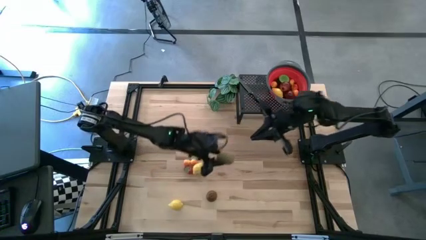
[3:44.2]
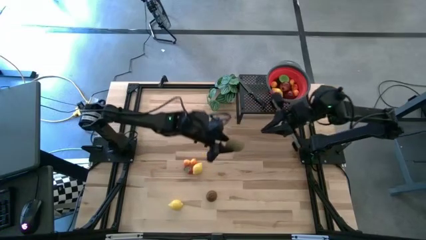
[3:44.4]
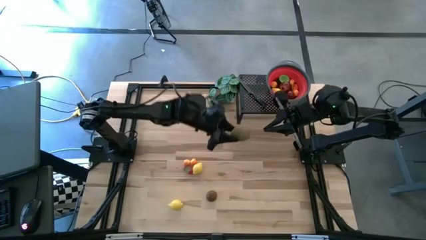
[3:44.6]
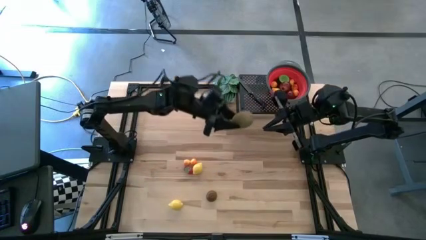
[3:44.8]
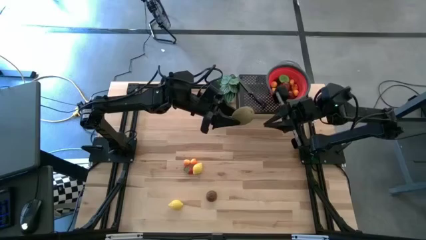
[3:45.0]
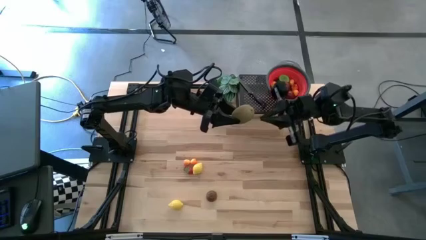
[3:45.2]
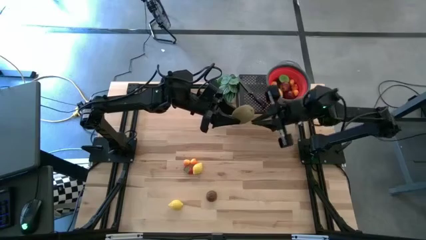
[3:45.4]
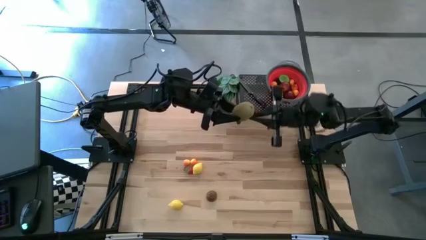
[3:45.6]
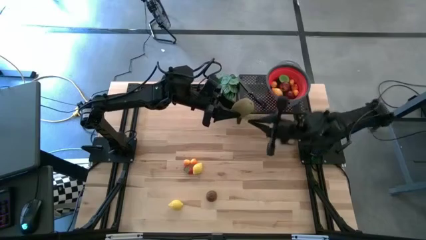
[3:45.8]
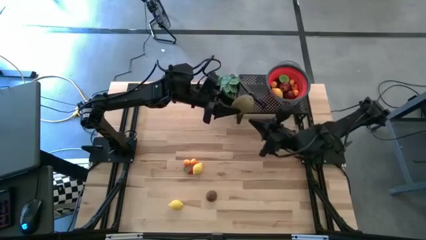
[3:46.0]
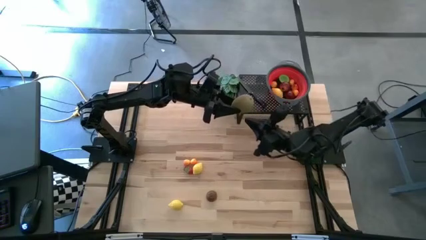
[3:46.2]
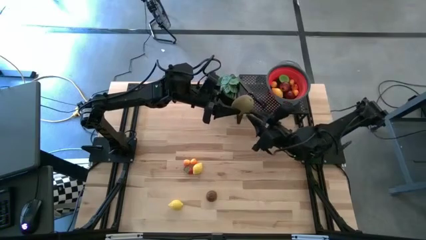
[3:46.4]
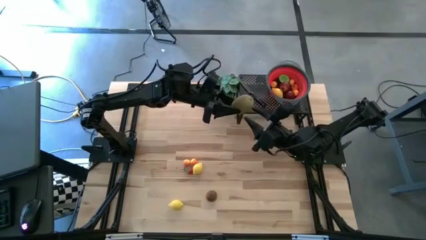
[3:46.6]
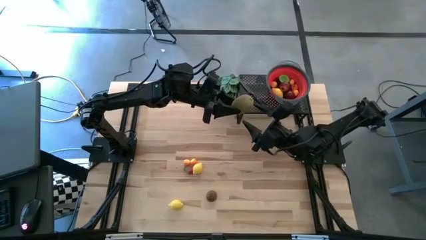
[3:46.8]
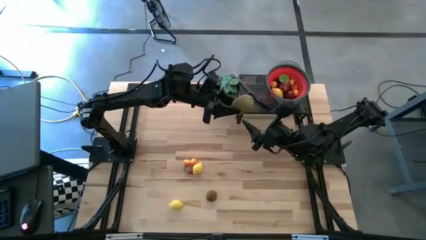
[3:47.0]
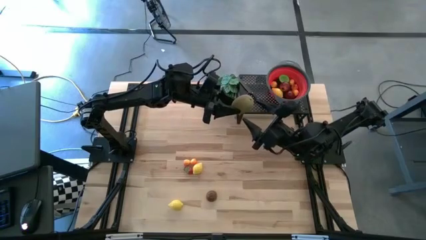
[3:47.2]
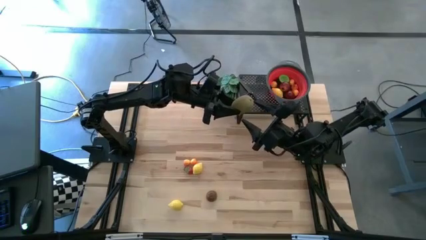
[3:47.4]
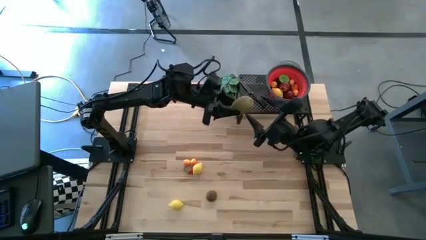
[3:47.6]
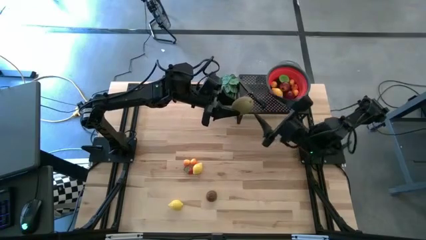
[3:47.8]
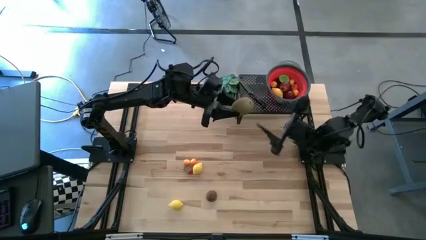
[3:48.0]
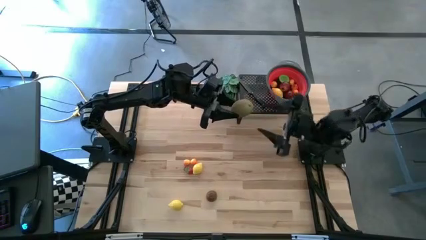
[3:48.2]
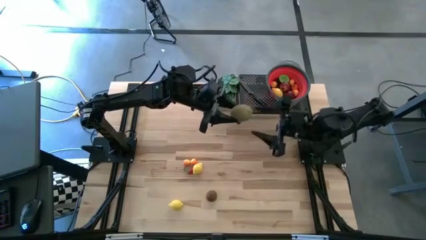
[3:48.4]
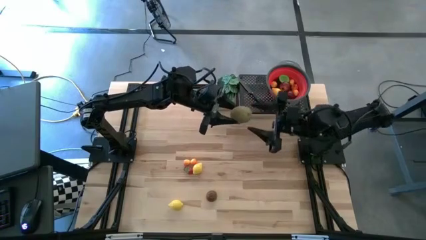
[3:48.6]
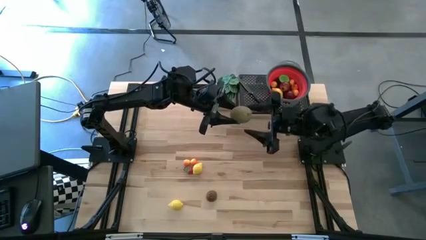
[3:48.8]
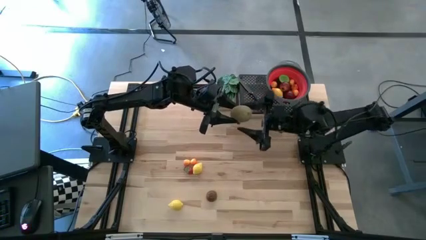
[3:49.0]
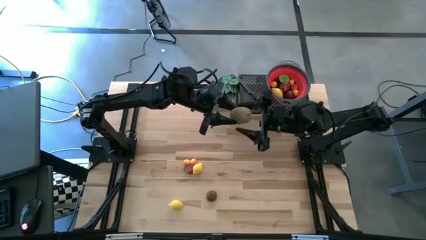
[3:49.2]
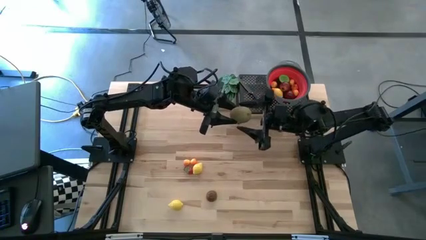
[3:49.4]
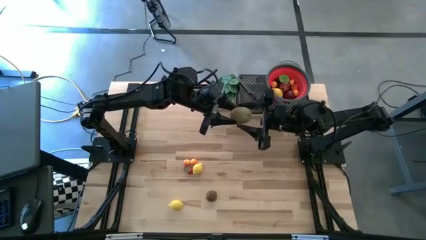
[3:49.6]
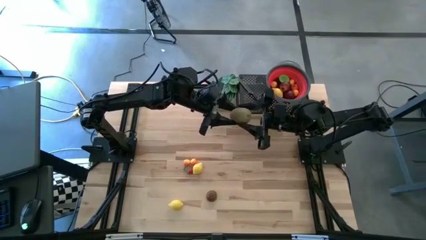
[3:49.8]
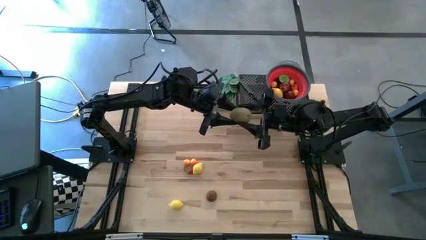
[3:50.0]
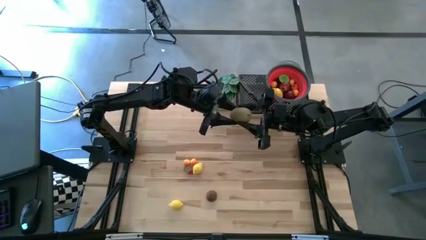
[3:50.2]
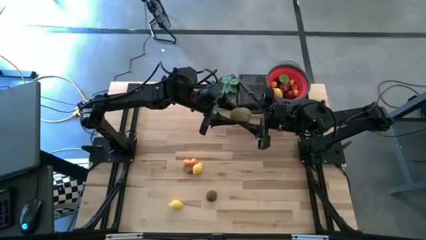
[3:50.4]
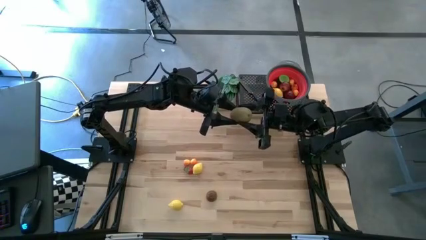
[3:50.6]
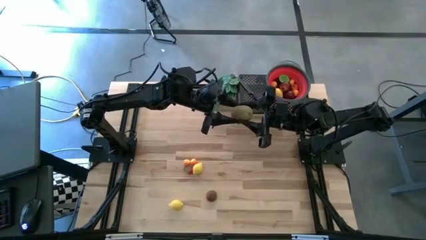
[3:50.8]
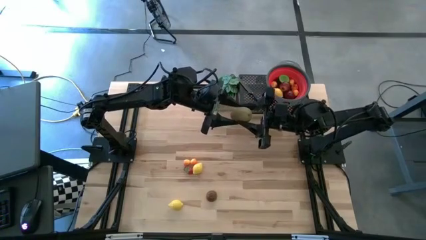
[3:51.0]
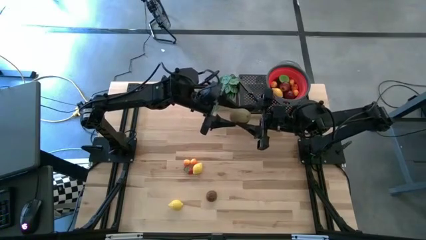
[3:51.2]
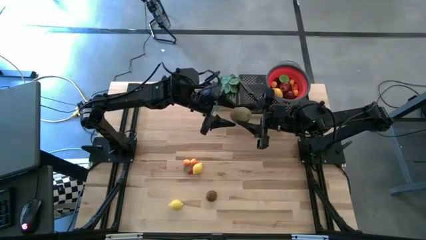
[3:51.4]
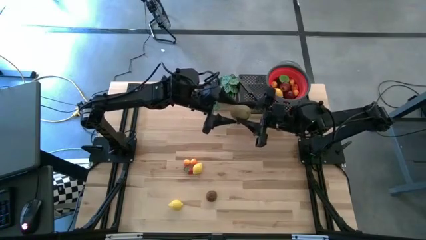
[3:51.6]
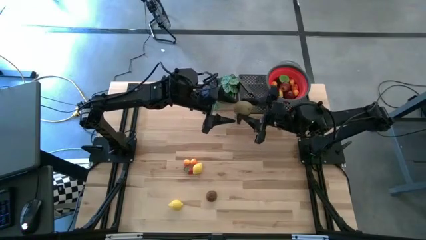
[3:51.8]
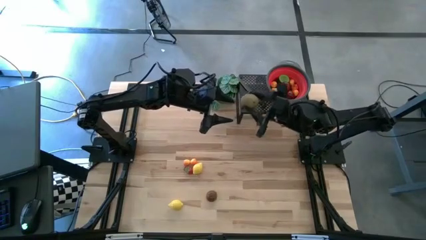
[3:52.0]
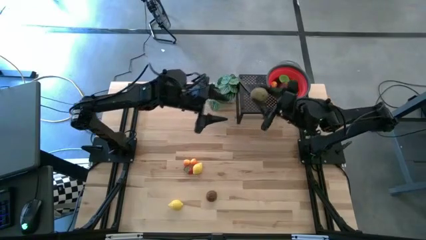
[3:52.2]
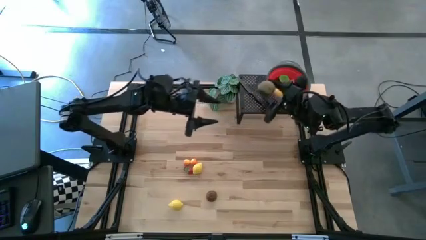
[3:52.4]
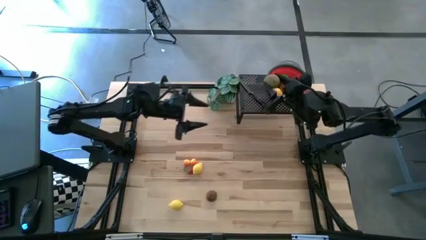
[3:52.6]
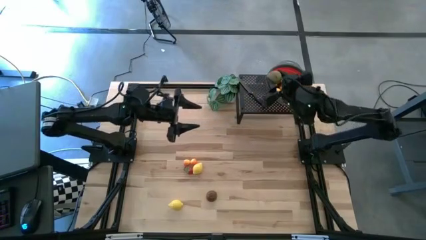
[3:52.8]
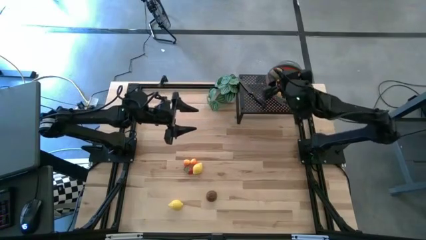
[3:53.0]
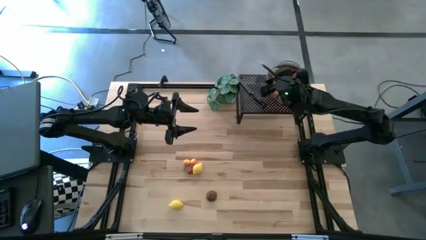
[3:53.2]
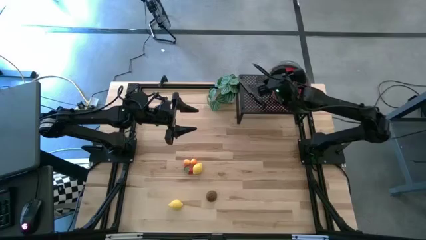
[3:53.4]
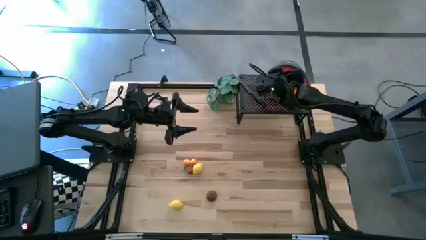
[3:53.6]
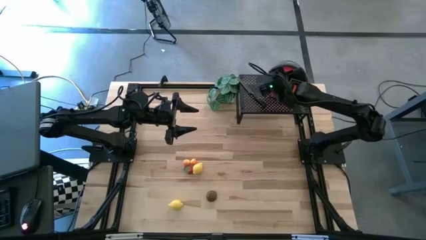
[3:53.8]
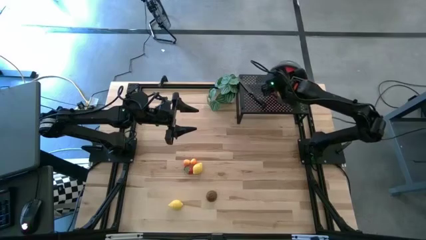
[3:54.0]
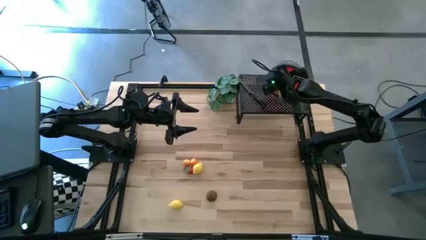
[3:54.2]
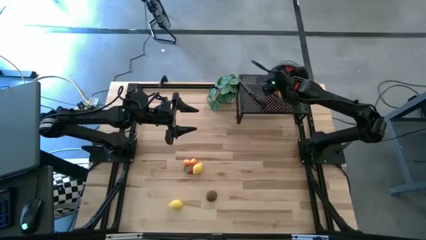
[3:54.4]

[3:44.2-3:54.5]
Task: Pick & Place Fruit
Put the brown kiwi into the red strainer bowl

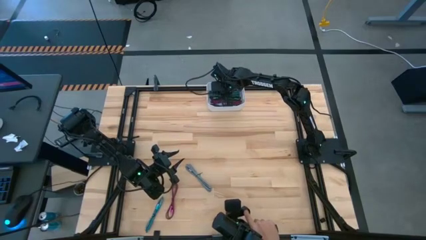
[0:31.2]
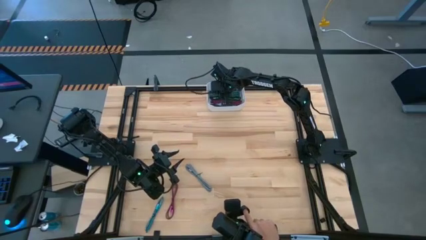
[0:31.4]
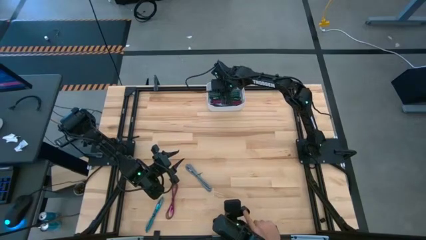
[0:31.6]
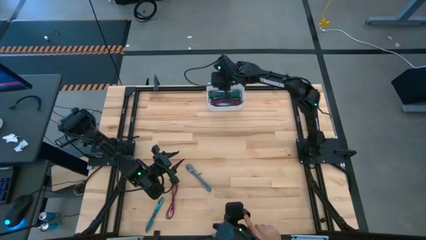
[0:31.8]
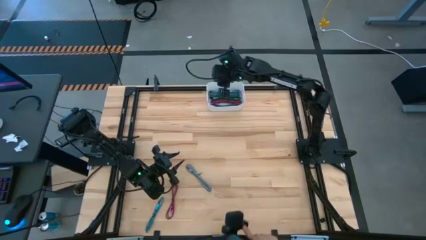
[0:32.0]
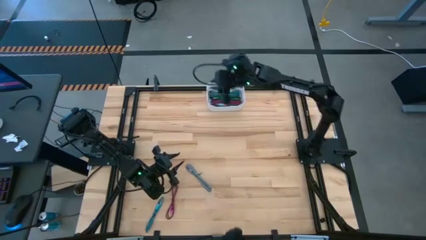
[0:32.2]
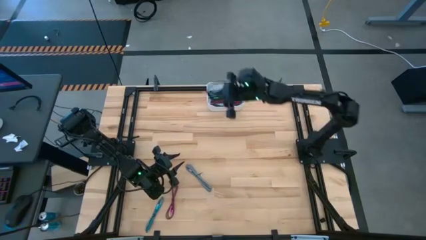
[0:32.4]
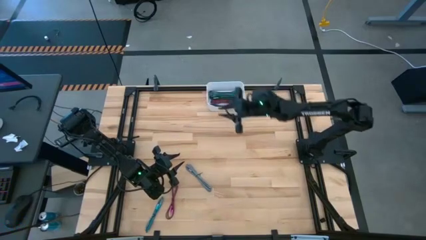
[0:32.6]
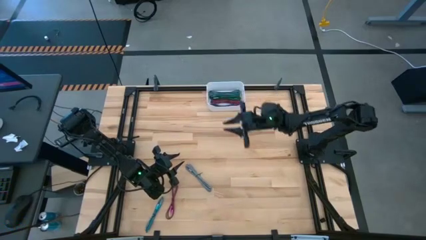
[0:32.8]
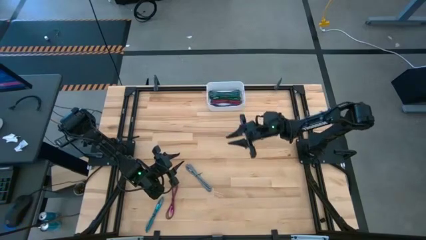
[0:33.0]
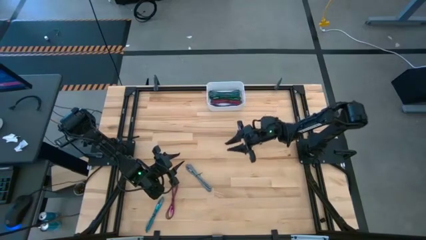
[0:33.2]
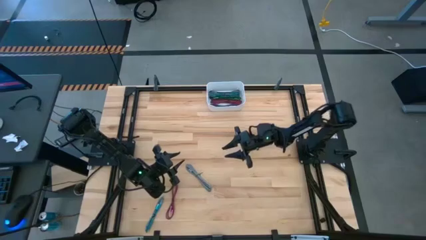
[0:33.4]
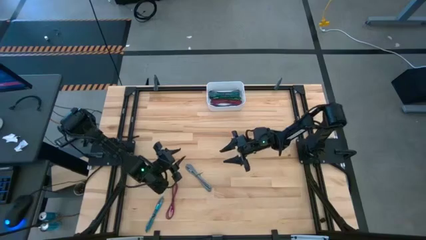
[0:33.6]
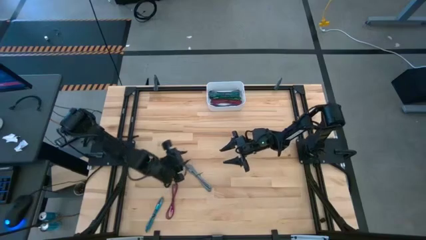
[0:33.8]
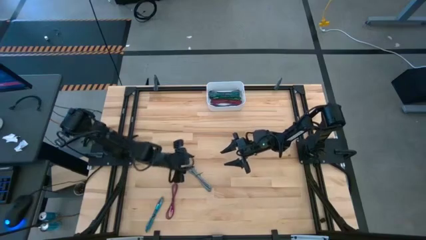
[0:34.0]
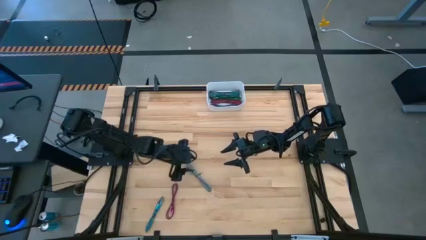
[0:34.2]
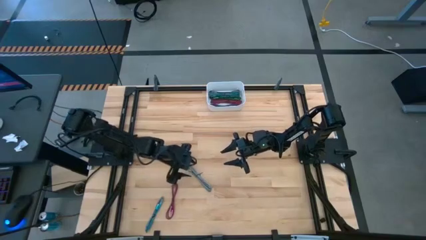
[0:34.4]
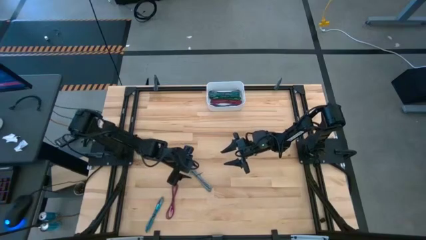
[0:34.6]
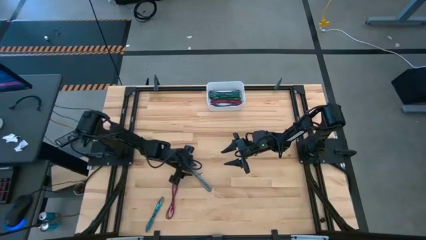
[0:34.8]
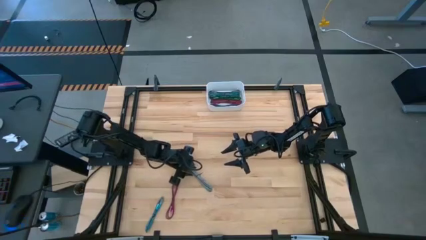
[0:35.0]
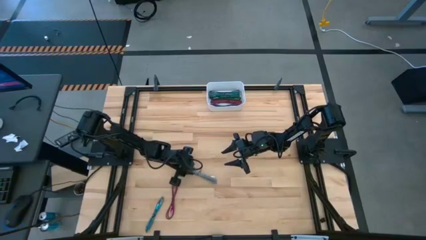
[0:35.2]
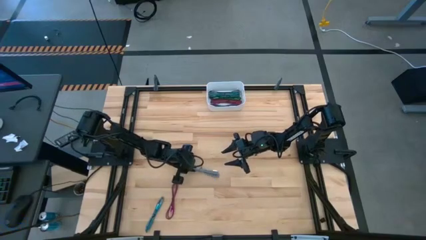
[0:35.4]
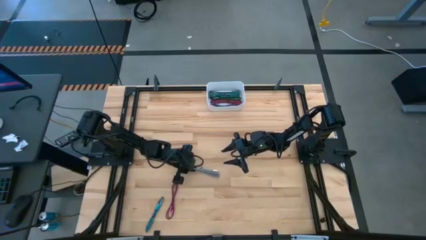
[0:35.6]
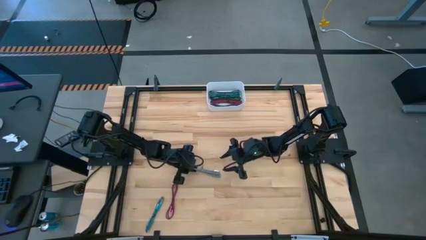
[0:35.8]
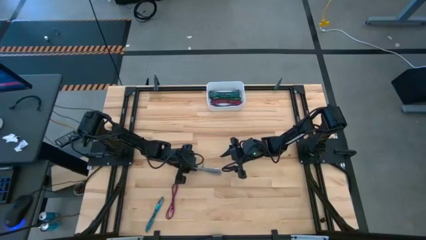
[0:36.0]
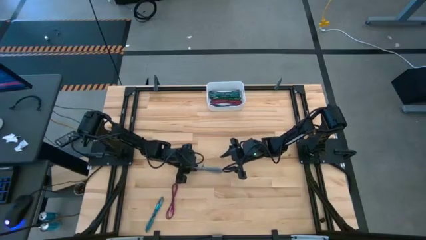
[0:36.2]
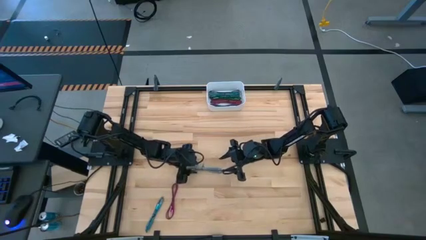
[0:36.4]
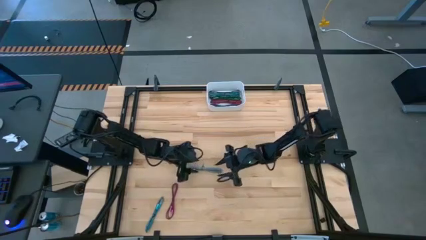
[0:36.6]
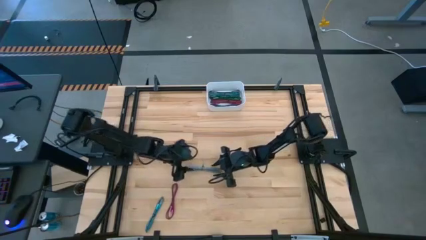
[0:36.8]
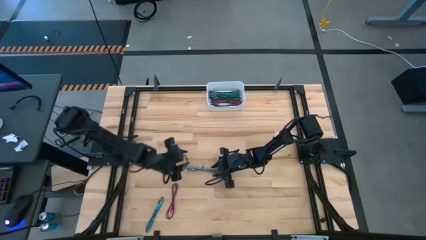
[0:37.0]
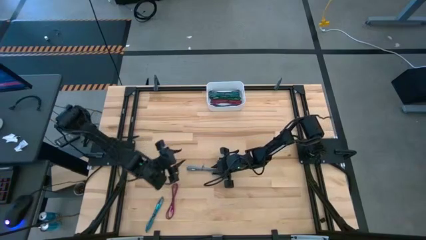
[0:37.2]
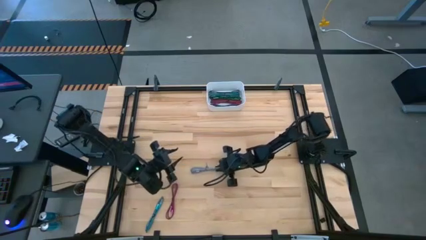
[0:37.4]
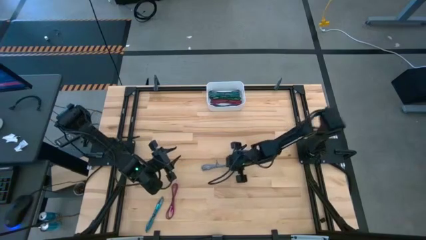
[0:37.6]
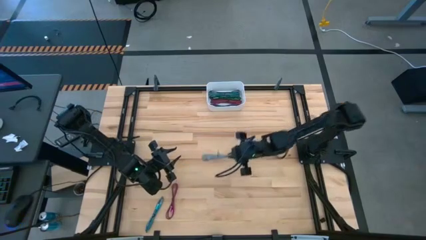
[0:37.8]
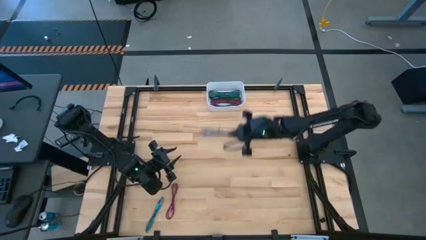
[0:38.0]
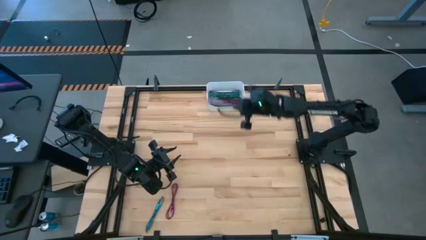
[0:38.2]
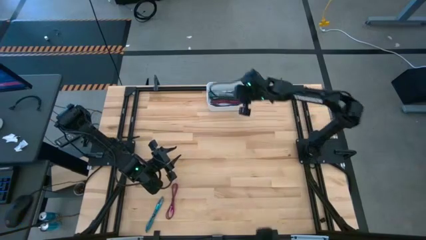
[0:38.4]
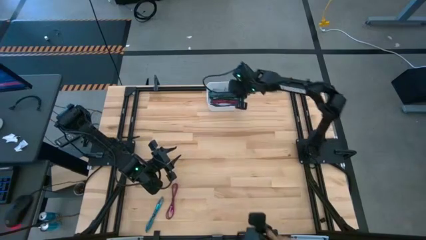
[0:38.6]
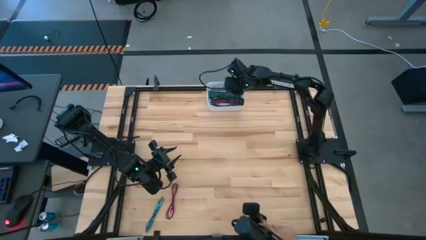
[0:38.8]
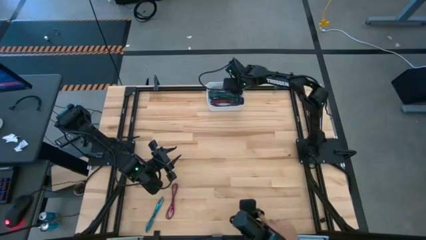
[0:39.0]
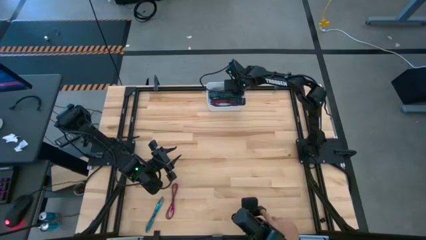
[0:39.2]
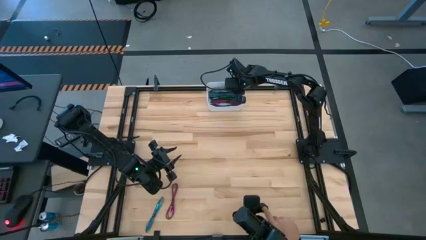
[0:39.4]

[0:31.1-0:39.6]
Task: Pick and place USB-C Cables
Put the white charger cable into the white bin
